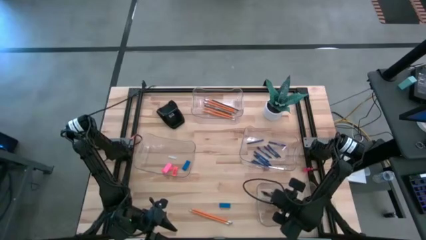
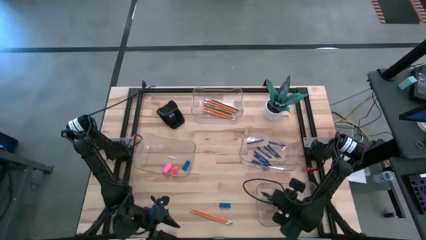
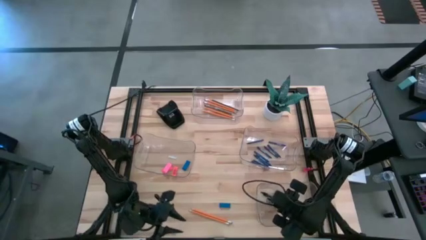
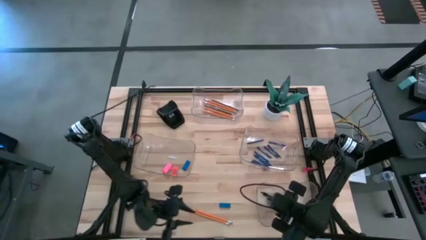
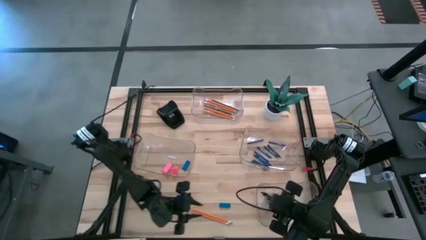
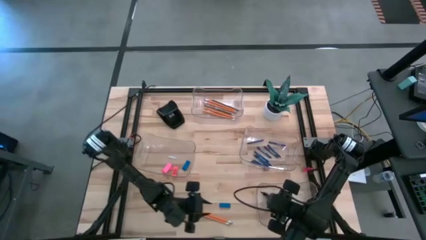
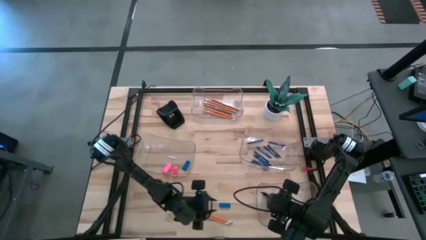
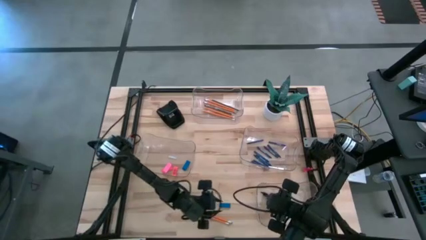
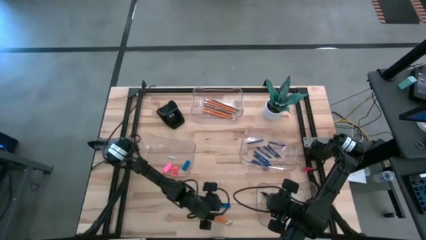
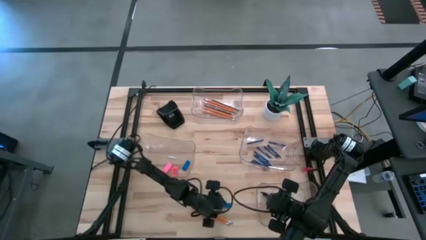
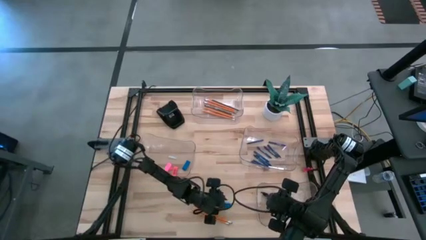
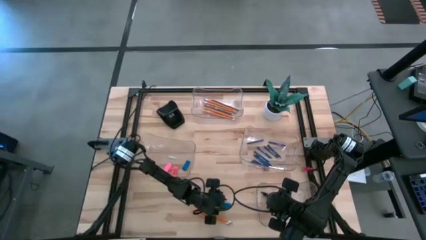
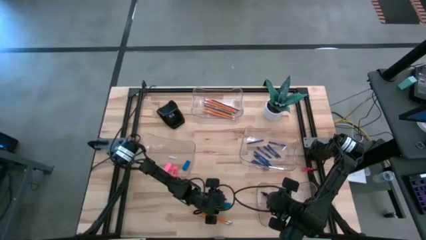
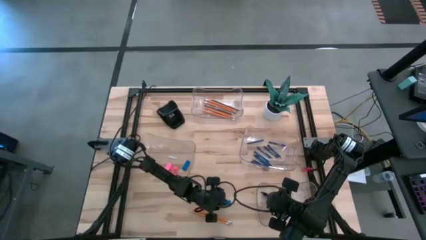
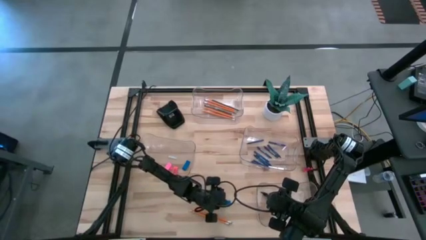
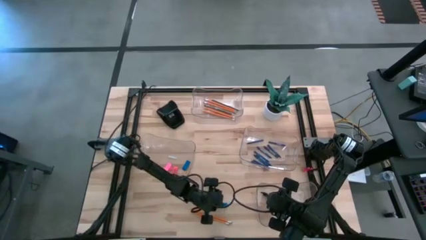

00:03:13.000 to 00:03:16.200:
Task: Sort crayons/erasers/pens/pencils in bins
Put the blue eraser into the middle left transparent bin

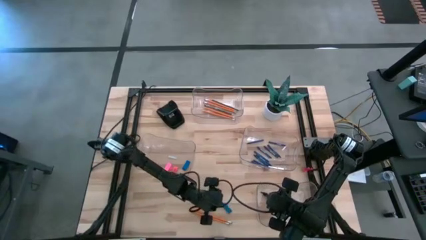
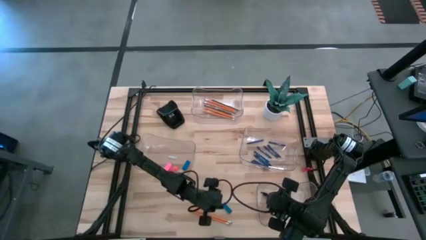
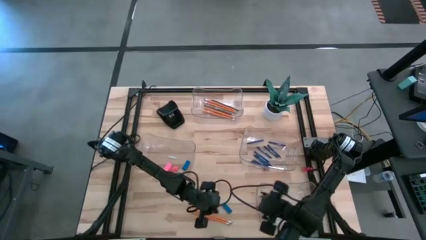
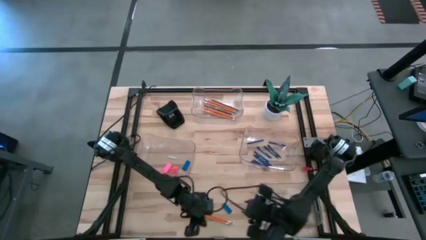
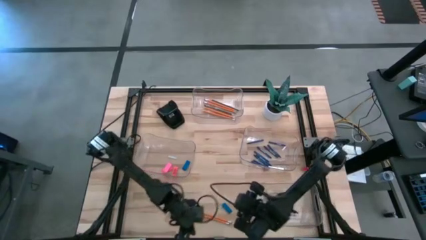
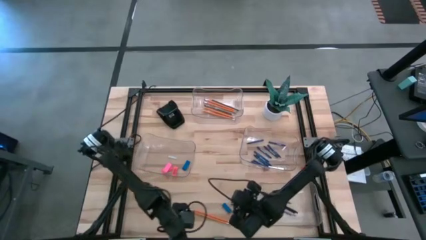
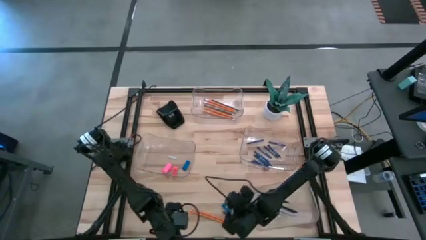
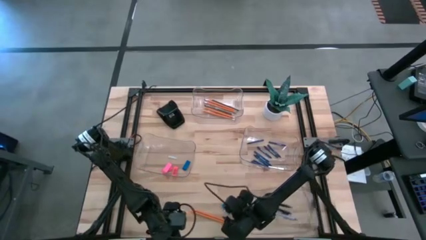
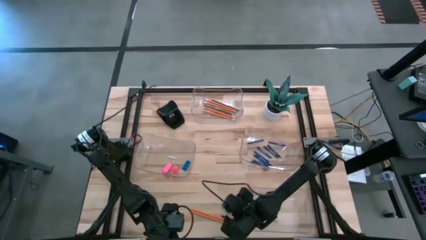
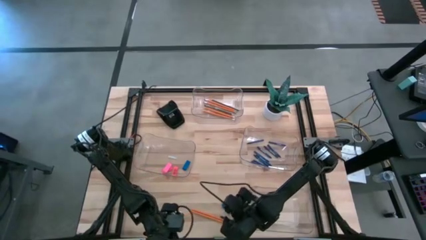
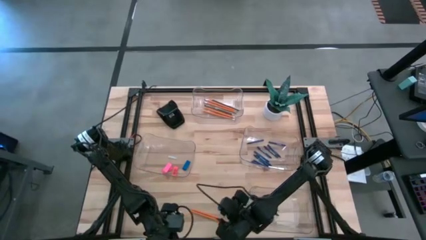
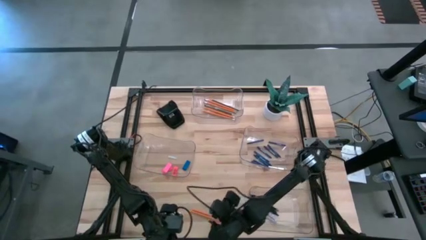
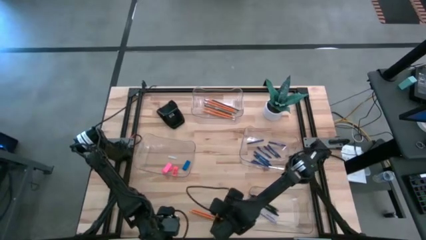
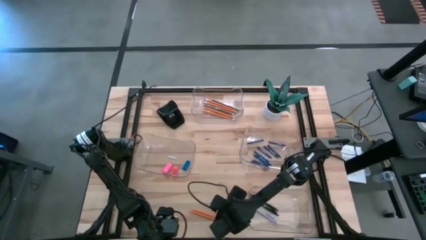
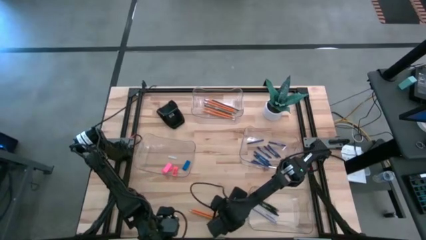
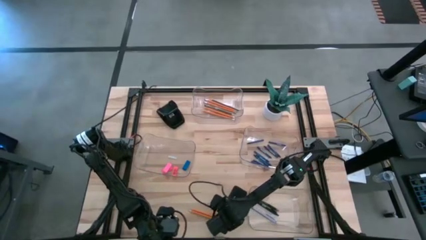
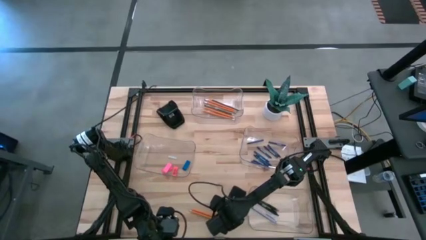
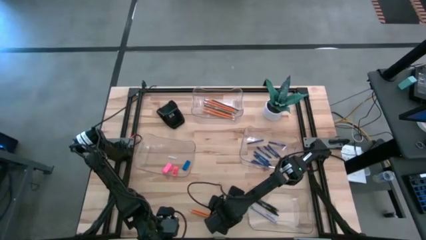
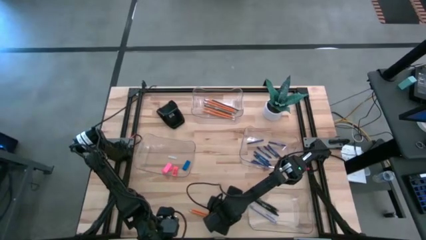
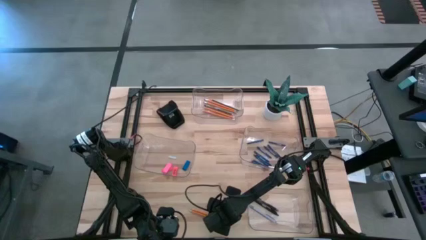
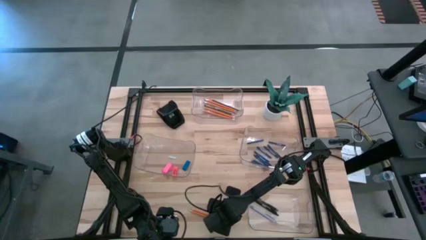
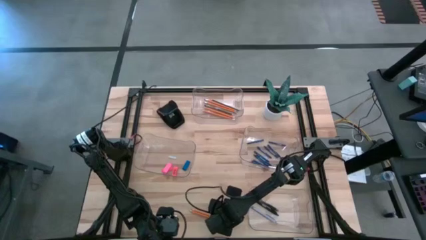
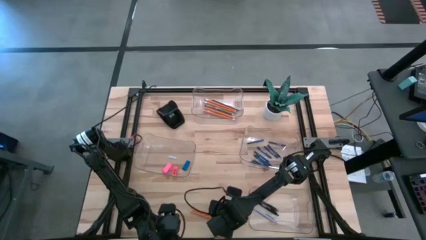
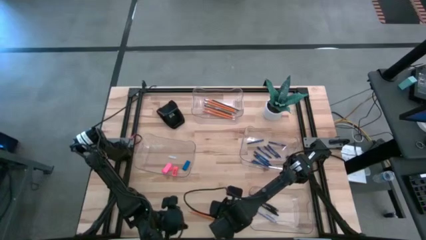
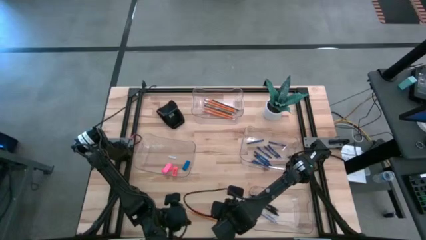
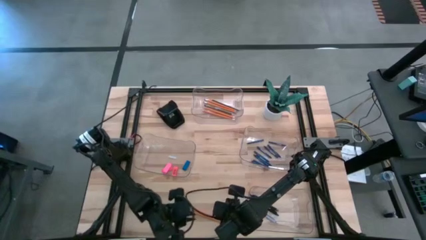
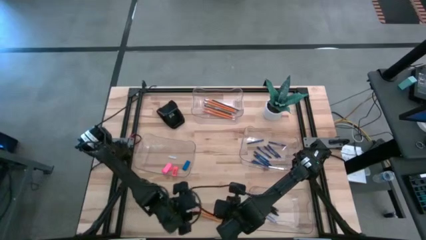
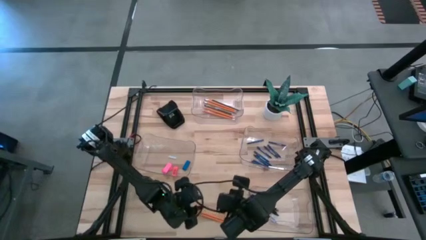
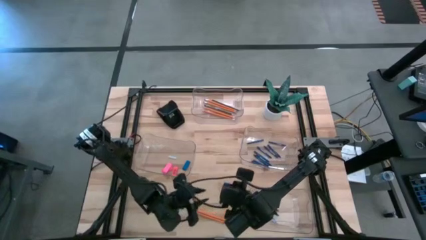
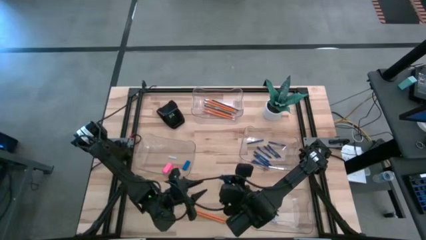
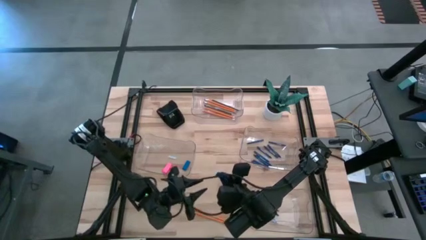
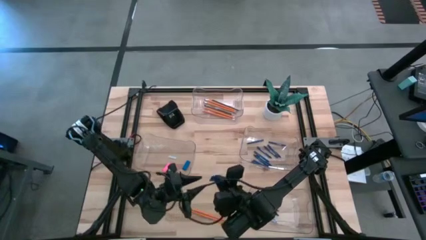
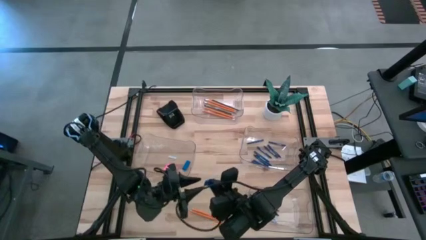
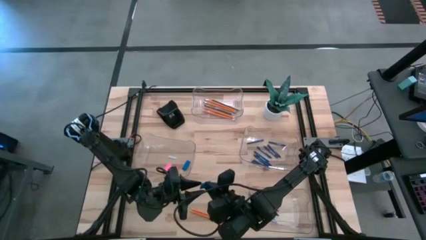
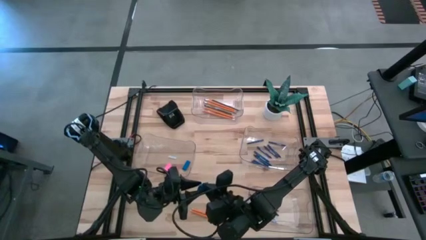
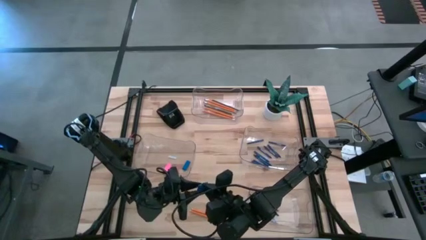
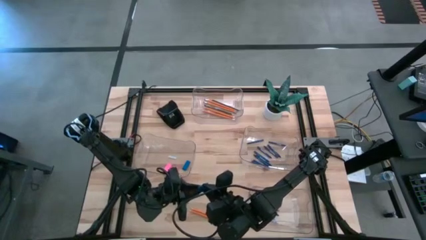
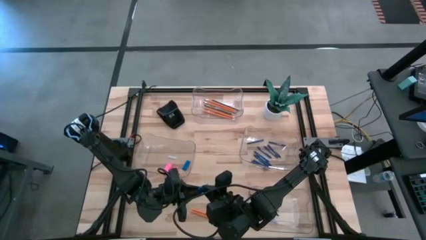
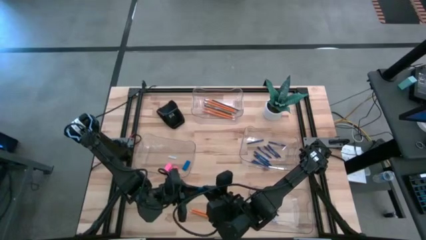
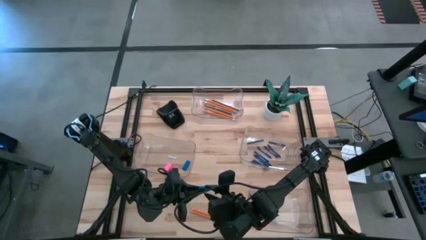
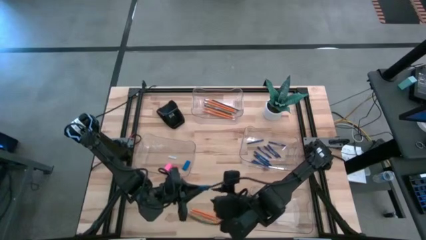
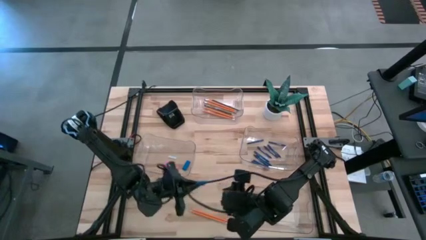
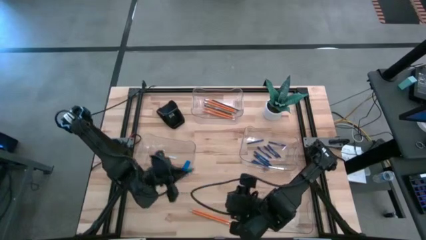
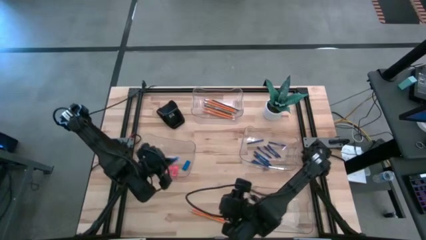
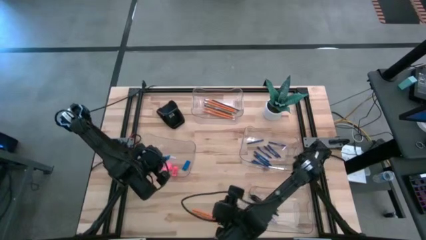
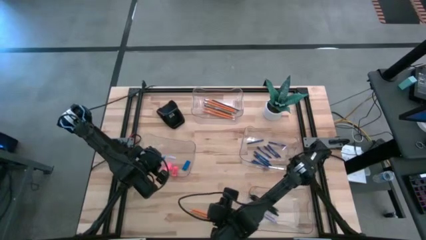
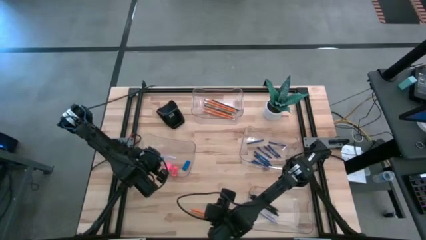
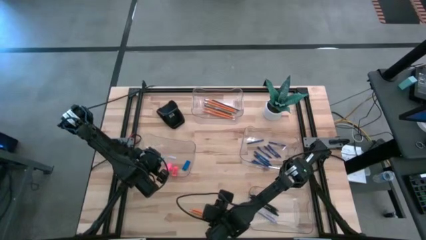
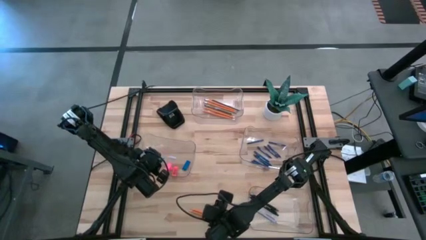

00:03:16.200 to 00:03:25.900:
Put the blue eraser into the middle left transparent bin

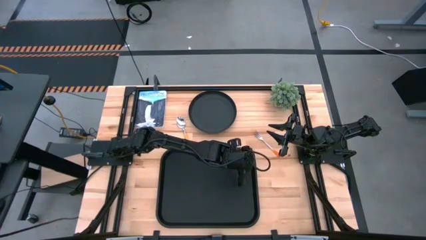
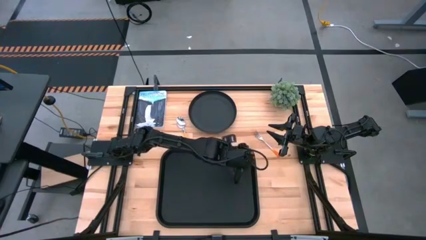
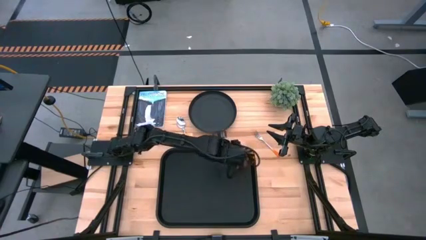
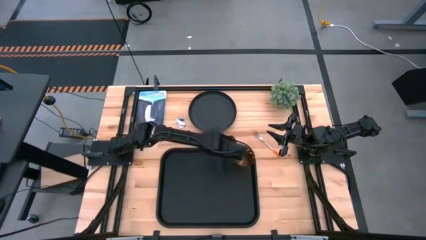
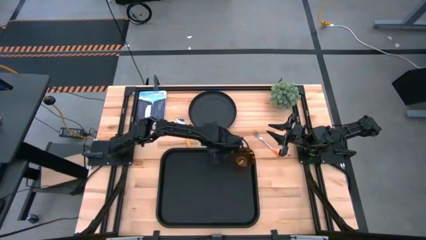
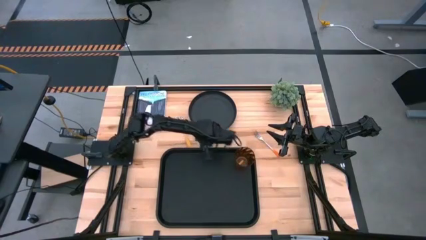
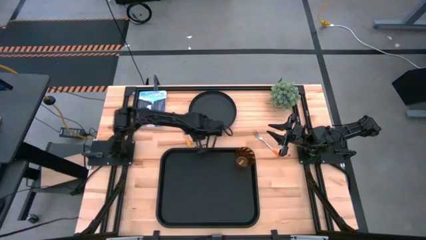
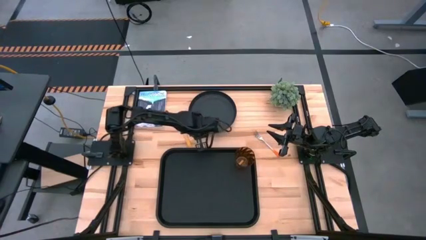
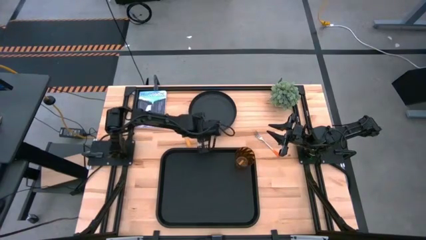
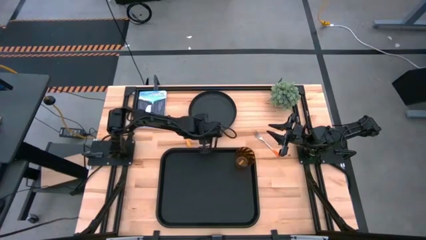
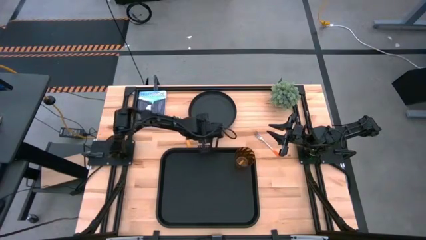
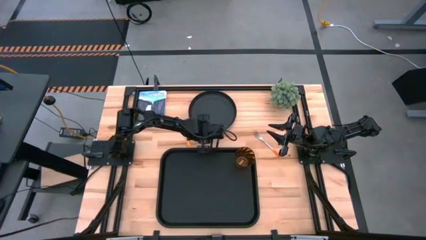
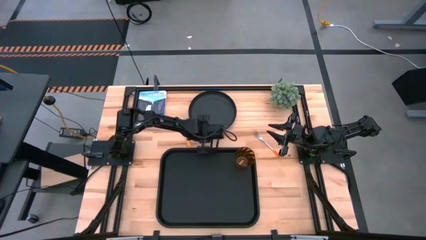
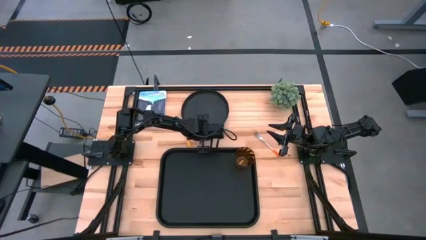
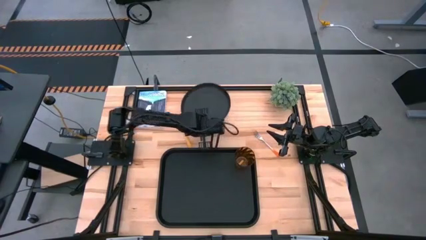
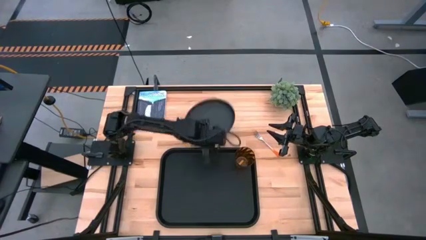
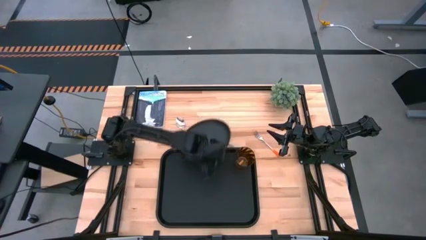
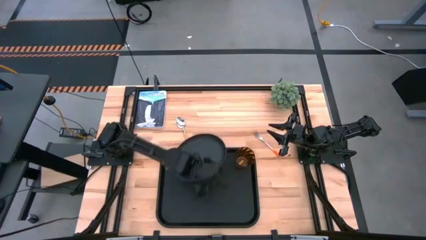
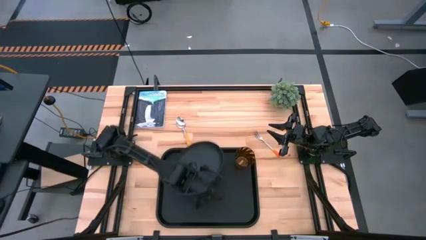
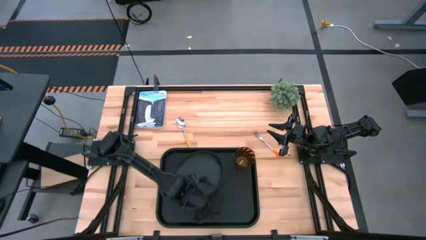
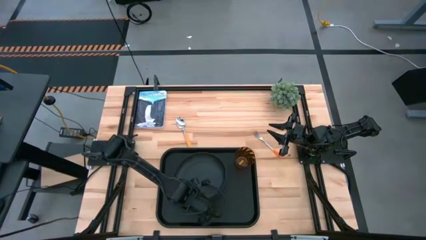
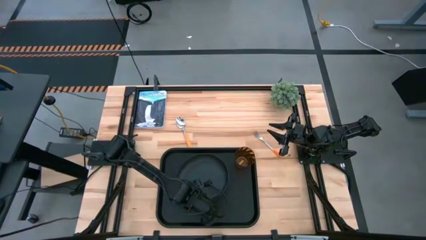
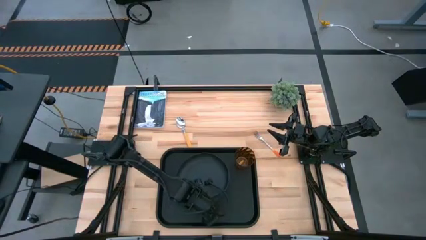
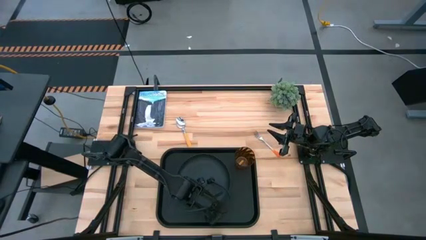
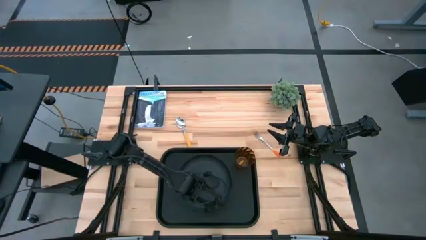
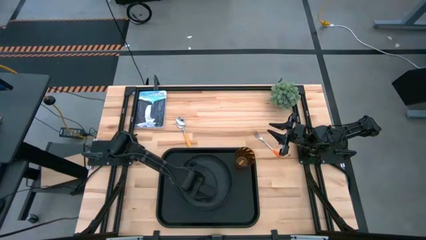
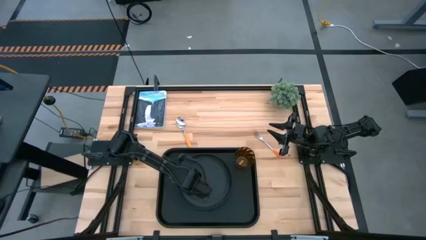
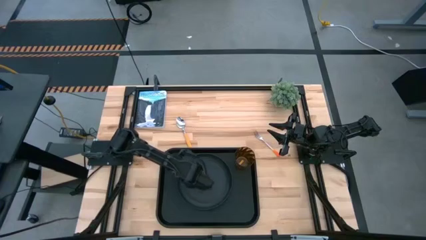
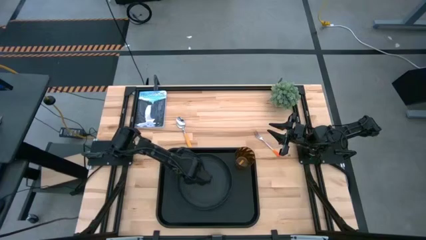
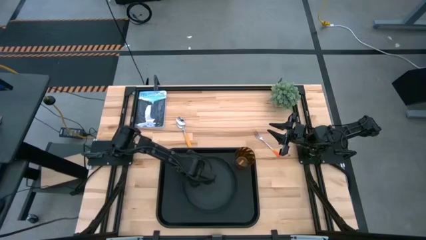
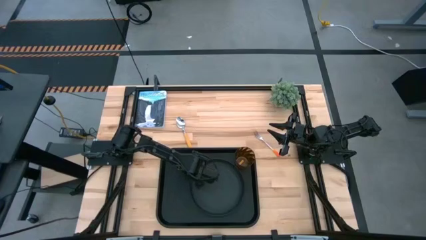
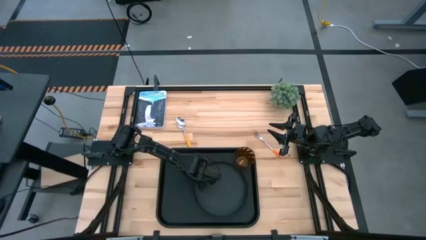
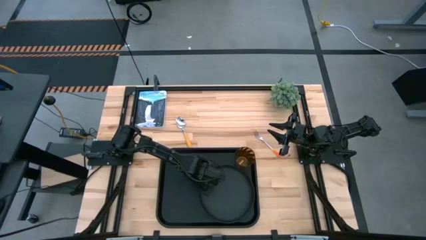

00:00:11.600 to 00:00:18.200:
Task: Pick and place plate/cup/fork/spoon on tray
Put the black plate on the black serving tray
